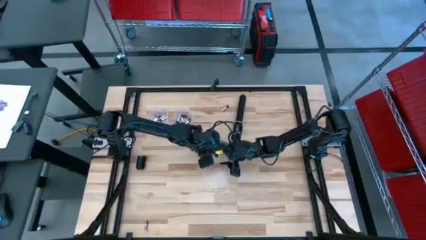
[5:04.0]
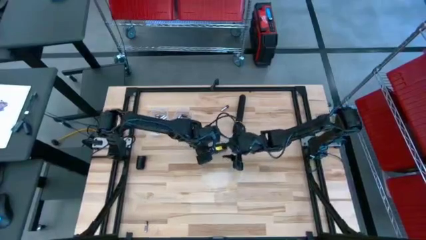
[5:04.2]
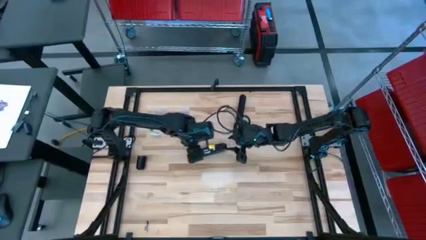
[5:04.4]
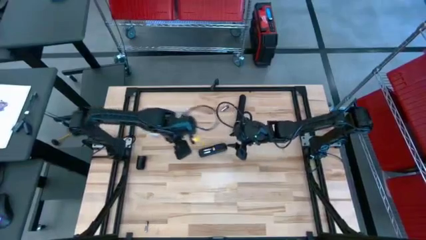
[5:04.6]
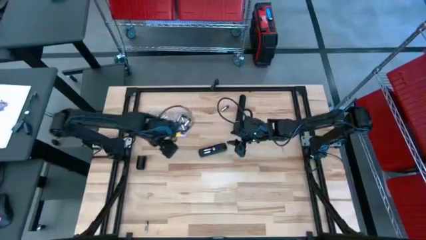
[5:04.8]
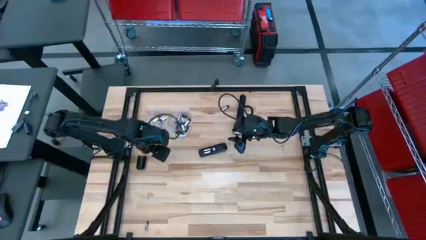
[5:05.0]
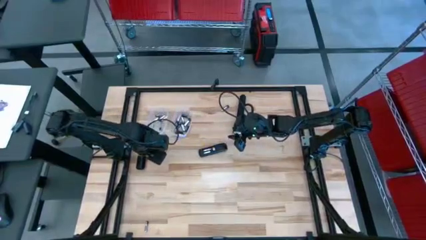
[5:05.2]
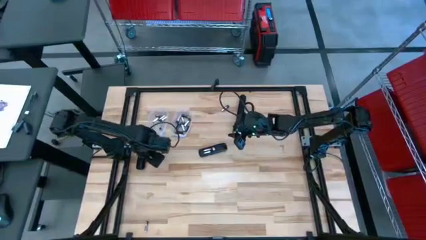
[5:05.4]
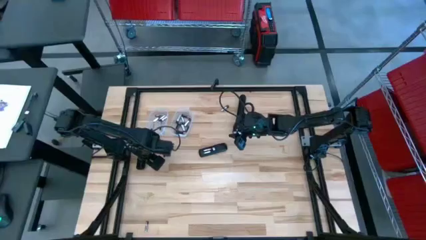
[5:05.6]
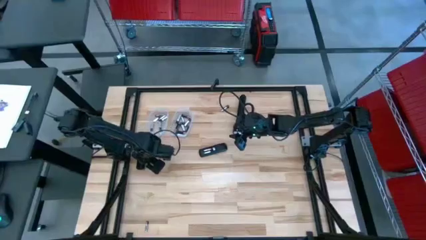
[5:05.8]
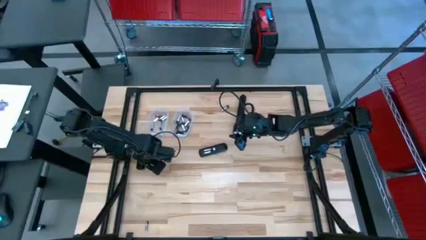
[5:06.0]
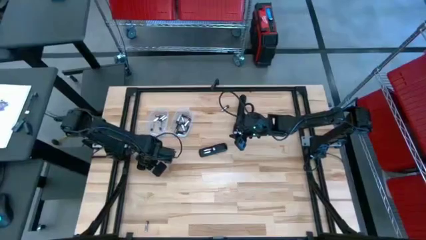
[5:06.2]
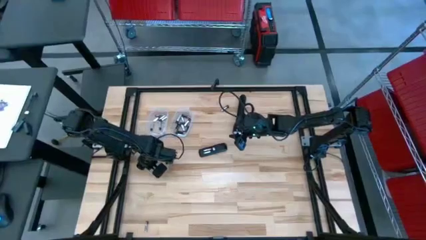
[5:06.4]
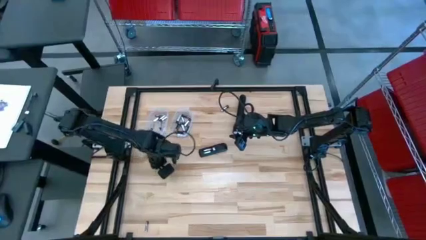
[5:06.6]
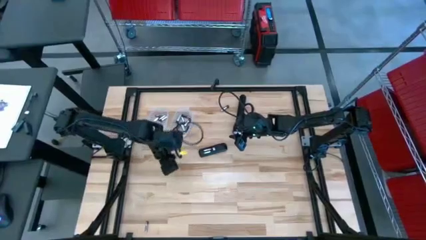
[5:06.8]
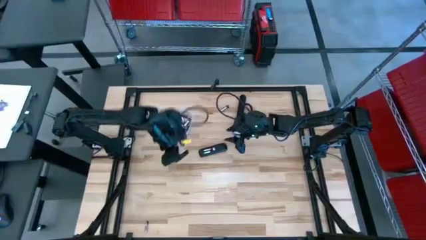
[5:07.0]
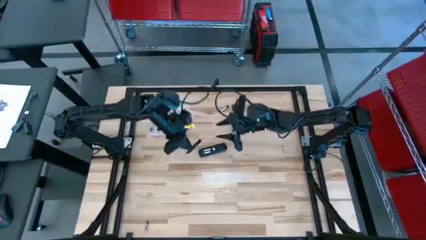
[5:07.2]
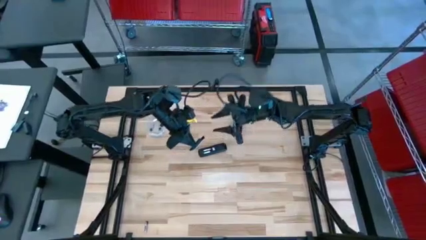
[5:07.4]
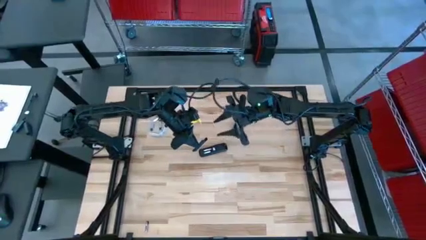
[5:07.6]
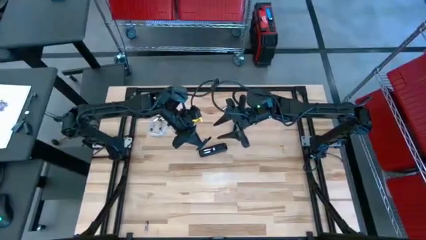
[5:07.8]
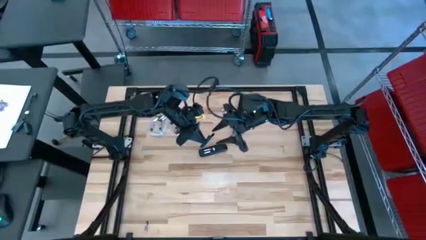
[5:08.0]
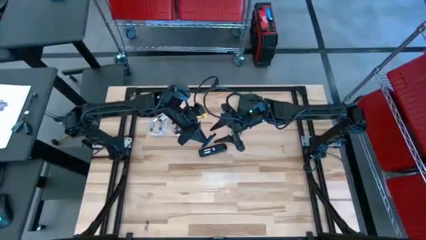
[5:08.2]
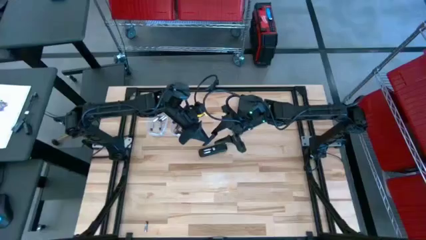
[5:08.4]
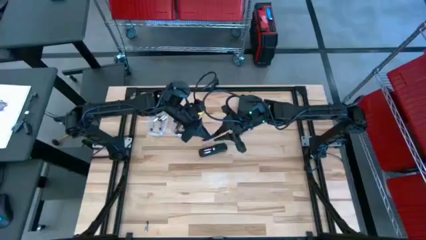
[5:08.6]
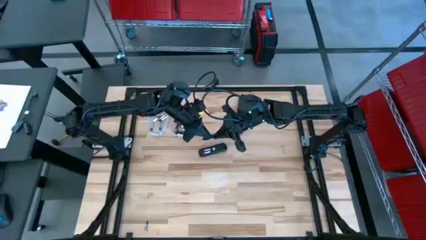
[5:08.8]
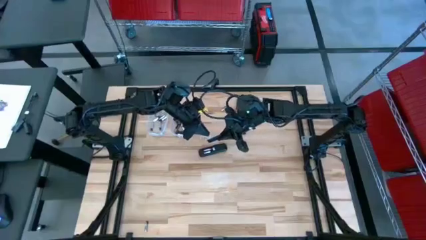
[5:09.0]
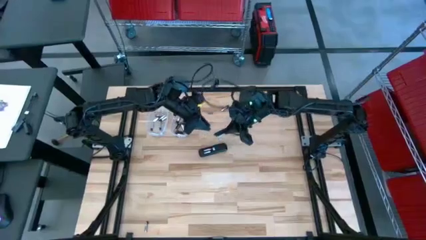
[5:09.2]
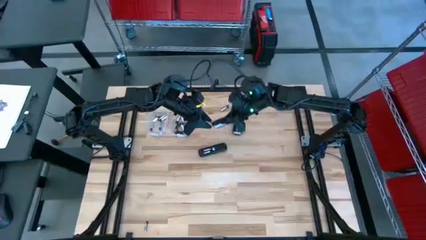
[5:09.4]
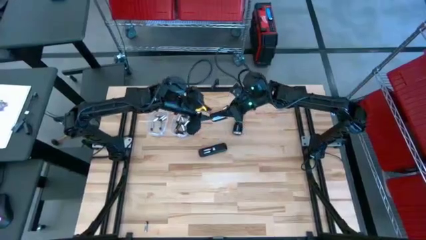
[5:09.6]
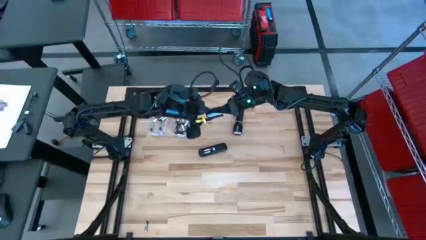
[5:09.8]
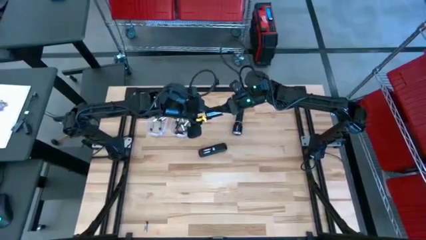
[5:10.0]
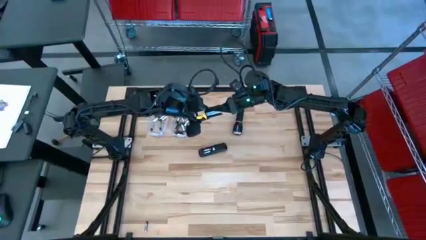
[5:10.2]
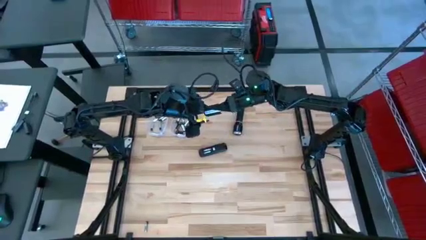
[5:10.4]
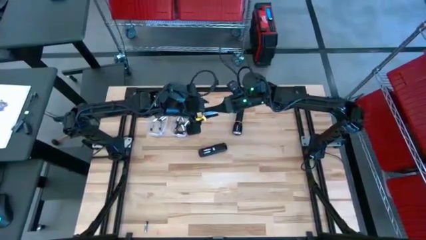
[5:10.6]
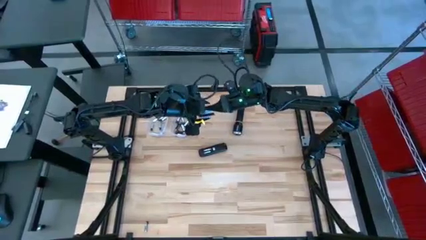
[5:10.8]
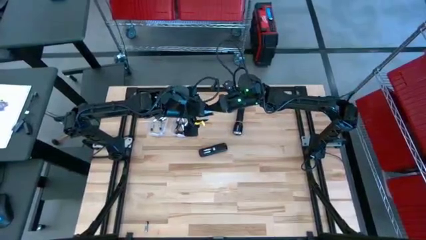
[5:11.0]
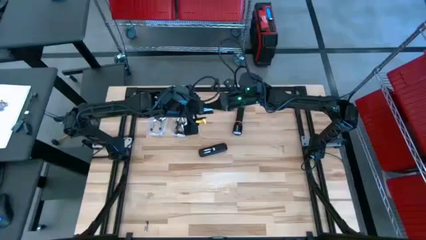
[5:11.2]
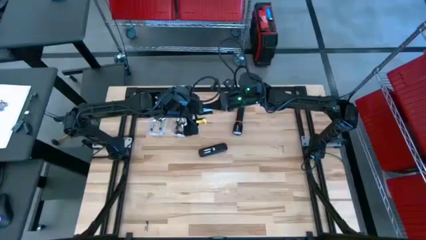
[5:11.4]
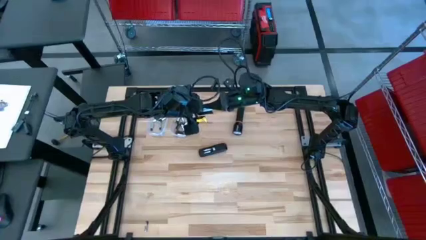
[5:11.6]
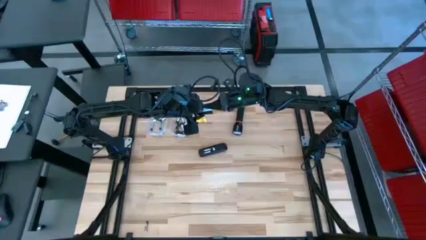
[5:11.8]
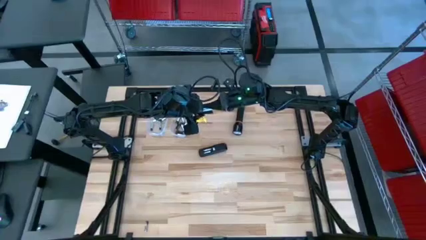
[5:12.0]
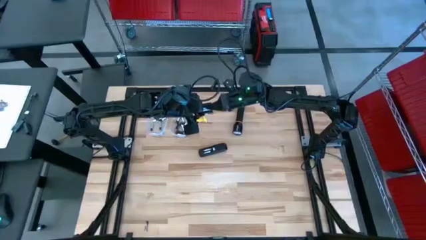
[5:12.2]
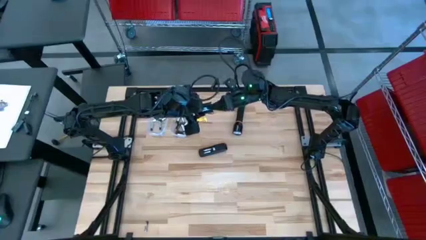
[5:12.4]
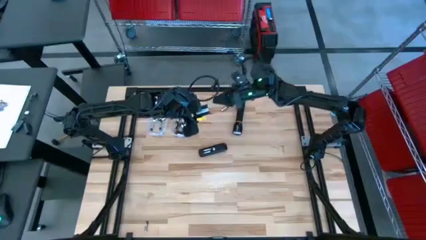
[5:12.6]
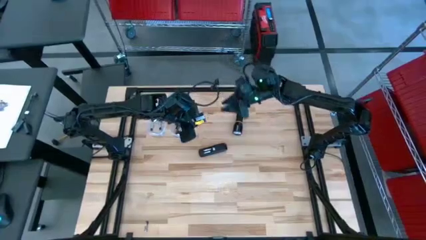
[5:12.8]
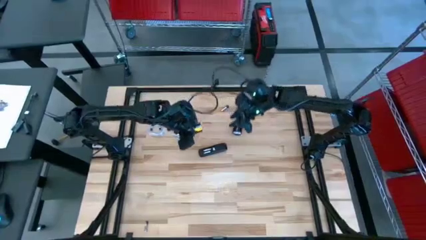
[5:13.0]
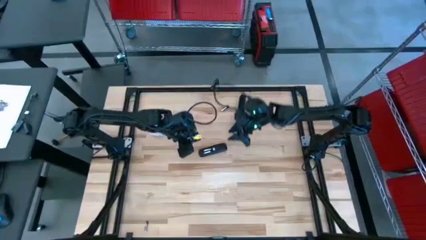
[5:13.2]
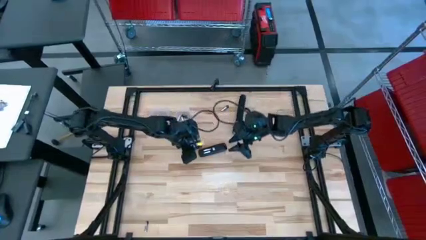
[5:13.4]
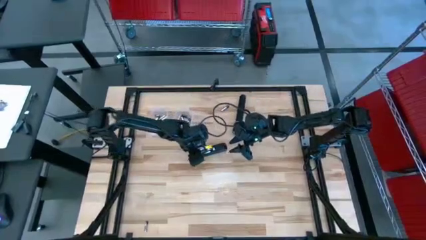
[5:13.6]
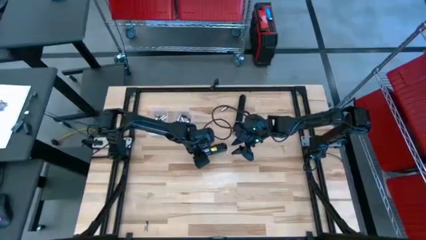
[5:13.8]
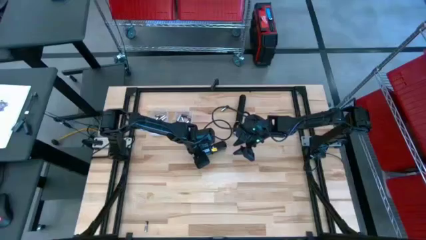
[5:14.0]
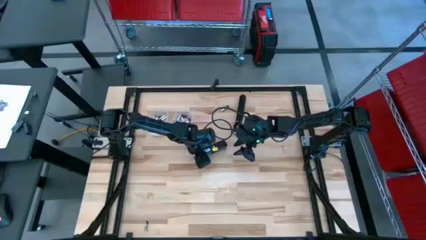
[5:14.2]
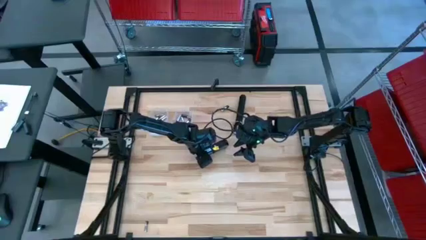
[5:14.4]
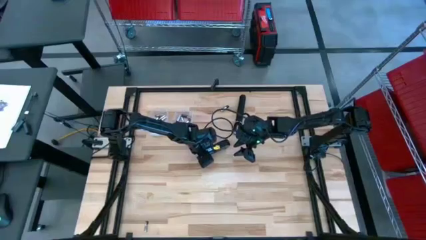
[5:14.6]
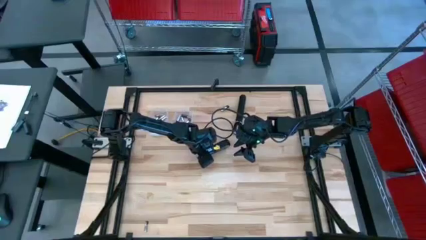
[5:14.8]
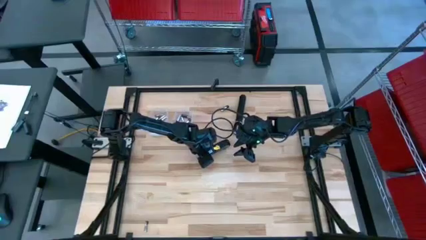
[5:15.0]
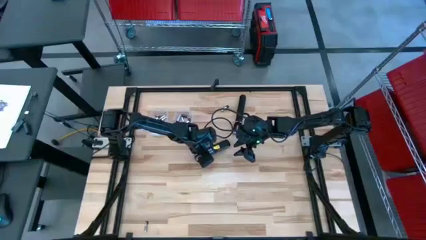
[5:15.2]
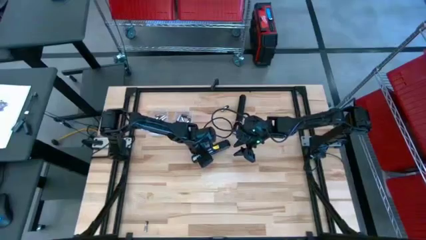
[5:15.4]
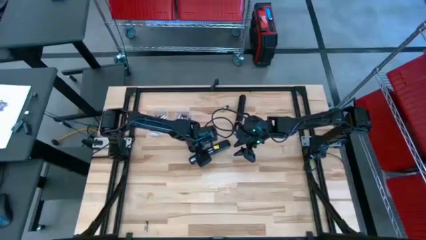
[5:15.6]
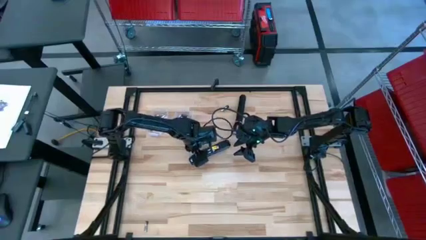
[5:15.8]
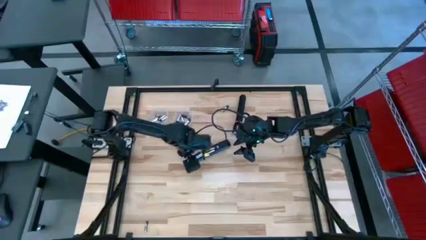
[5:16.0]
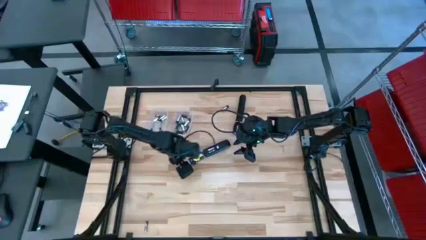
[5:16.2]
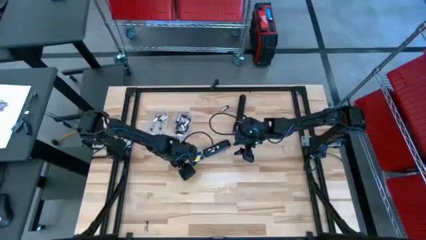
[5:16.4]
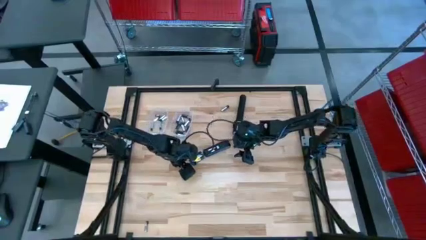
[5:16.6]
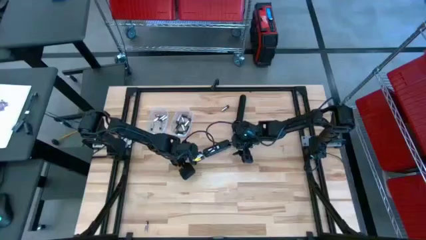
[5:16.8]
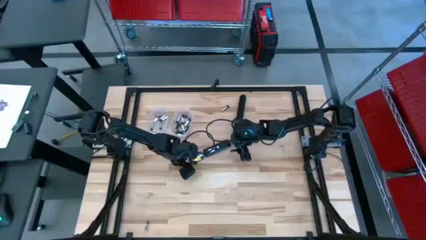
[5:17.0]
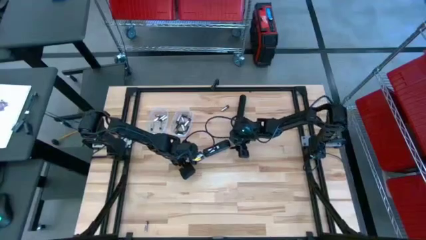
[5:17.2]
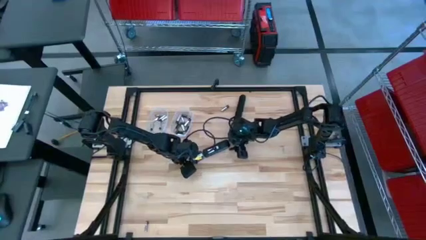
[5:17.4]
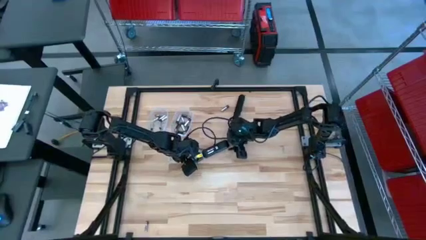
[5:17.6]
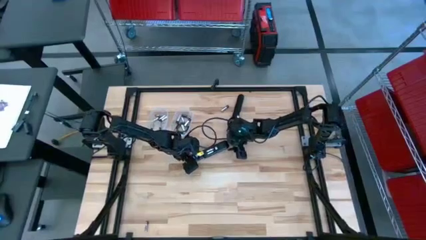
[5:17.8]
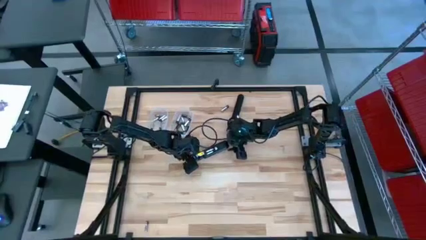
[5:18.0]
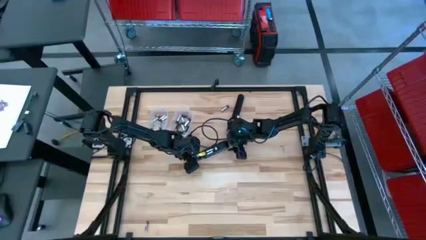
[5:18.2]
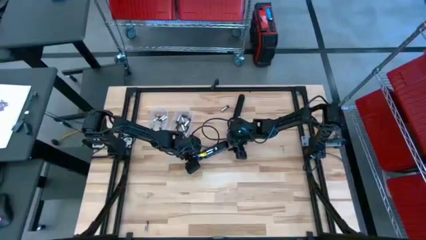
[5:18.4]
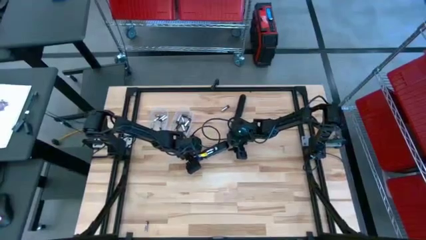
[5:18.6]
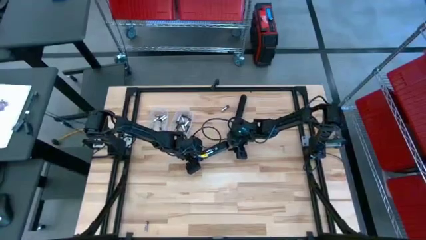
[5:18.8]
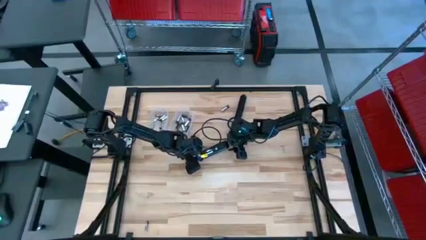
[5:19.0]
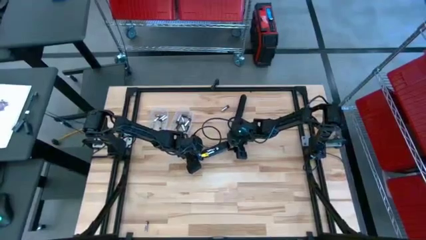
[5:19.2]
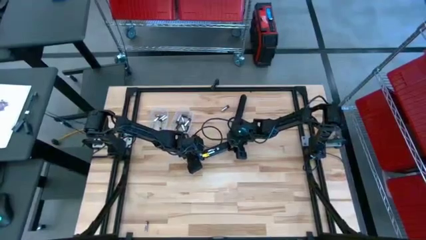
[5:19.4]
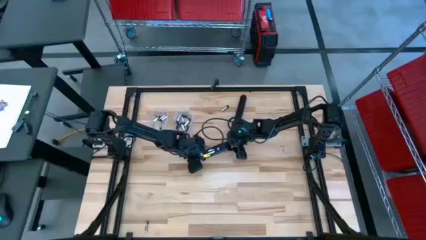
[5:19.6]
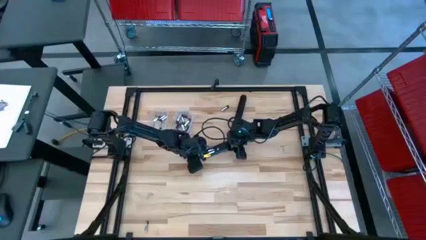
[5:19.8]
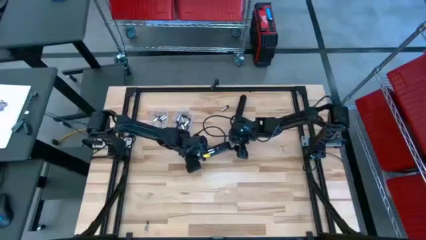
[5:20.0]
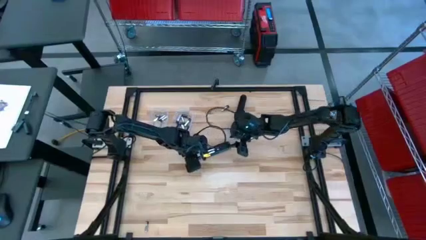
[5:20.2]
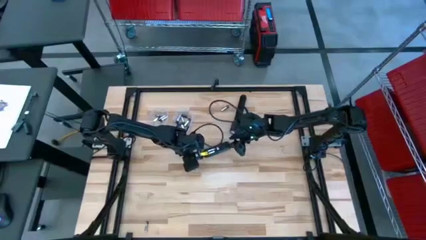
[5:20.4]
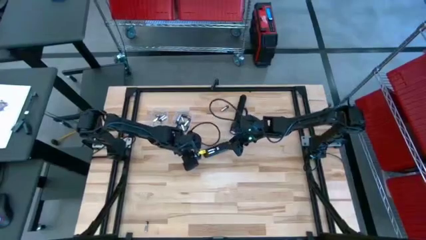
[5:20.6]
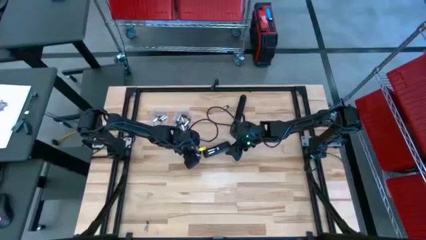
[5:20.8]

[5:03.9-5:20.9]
Task: Insert battery
Close the remote control battery compartment

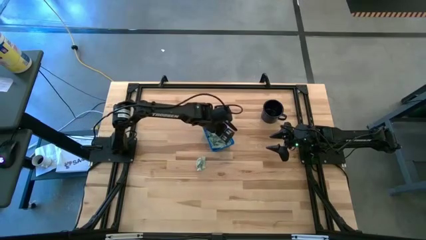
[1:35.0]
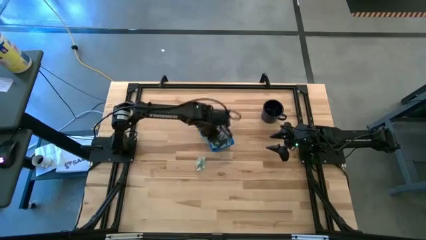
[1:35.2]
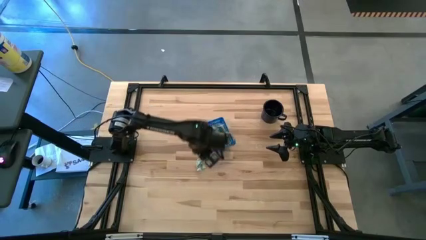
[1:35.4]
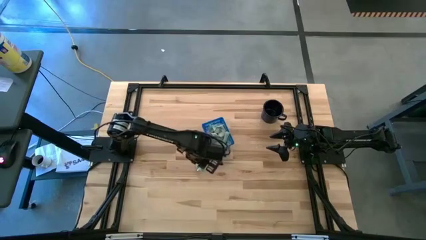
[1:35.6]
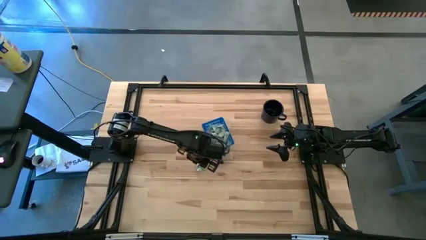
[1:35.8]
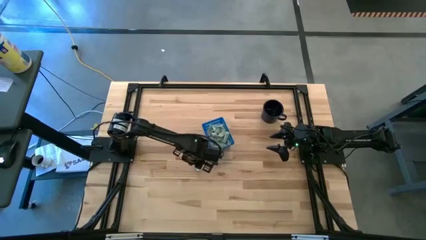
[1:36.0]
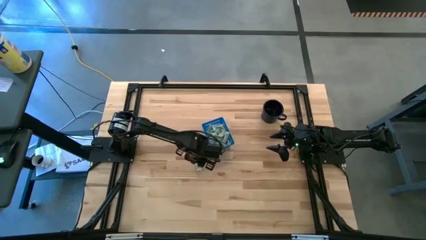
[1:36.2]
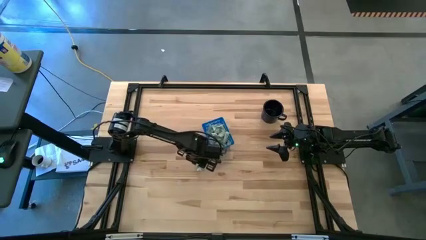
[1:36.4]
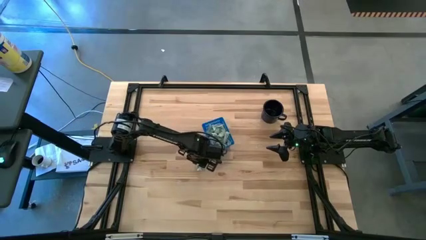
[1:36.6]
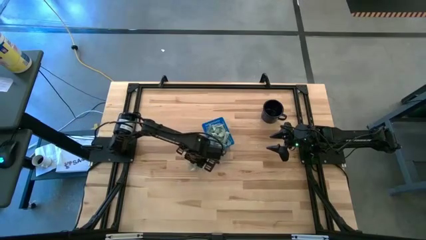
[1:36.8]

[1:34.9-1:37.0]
Task: Pick and place Stevia / Truvia into bins
Put the stevia packet into the basket
